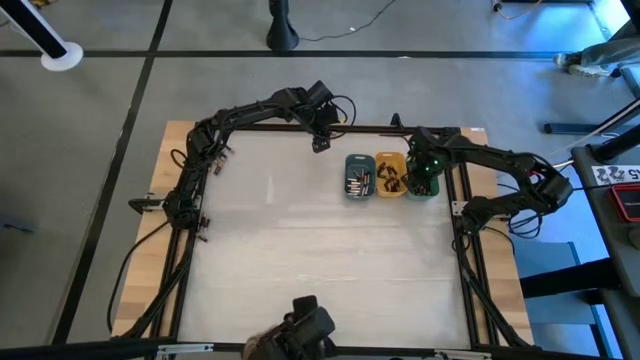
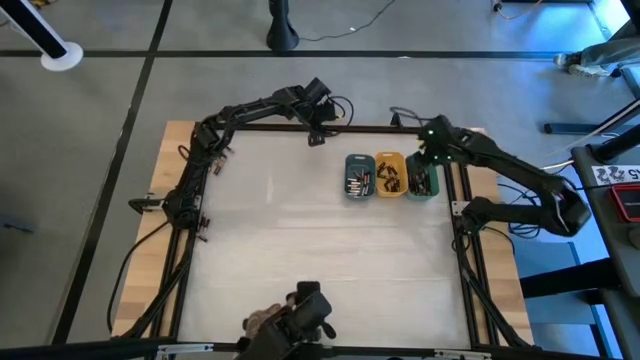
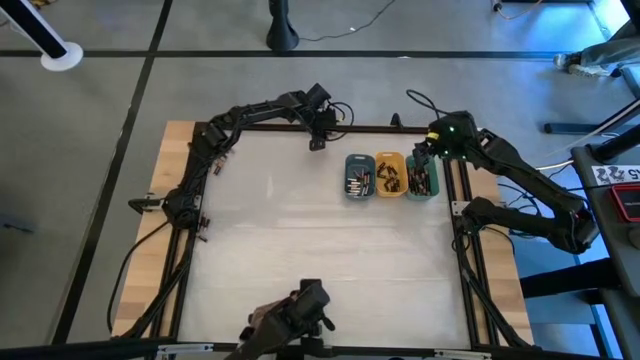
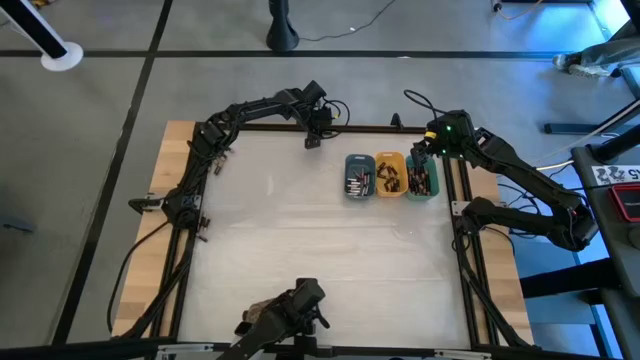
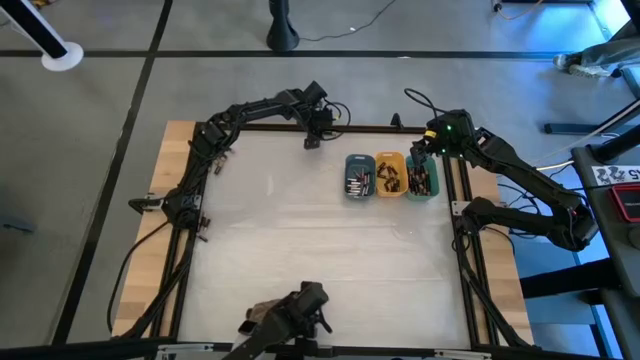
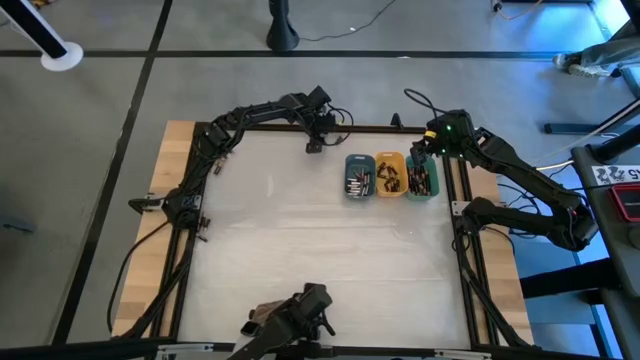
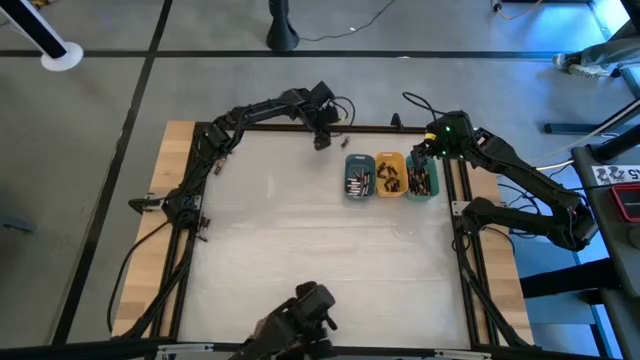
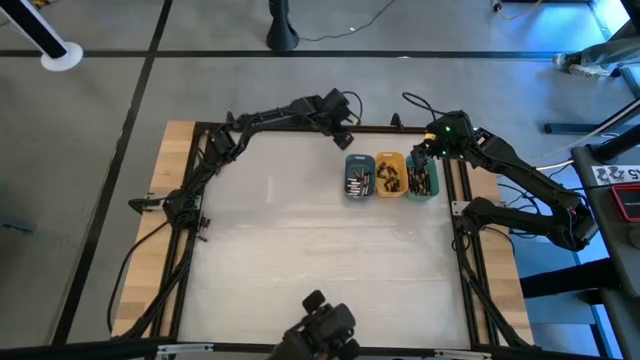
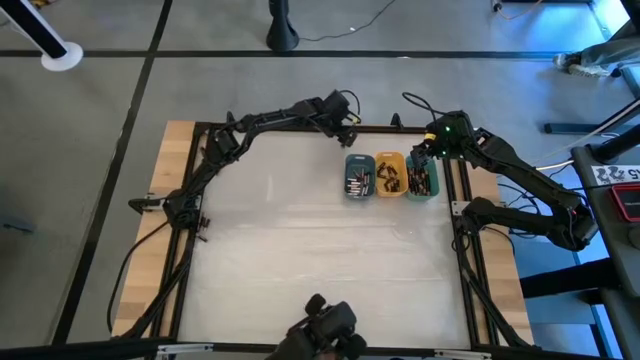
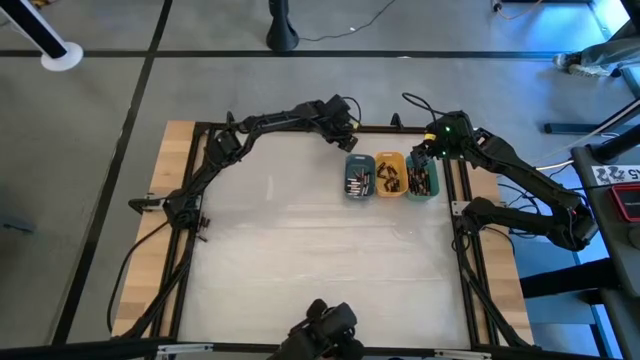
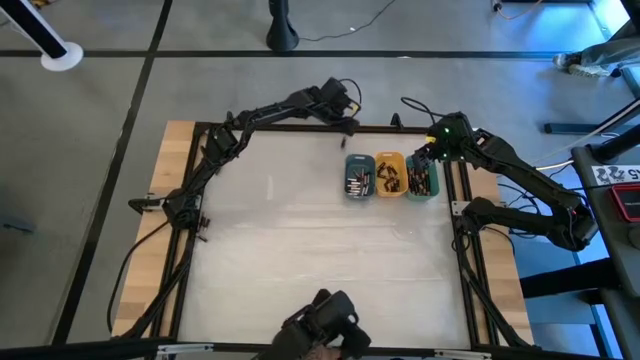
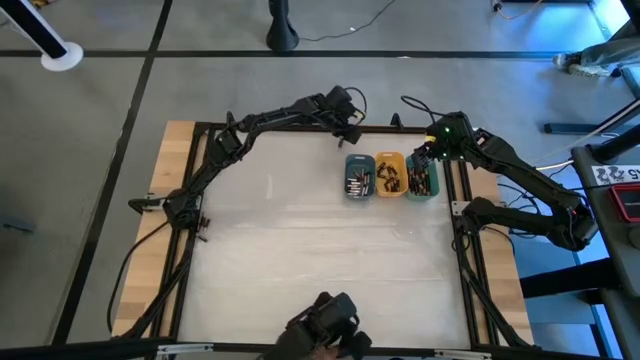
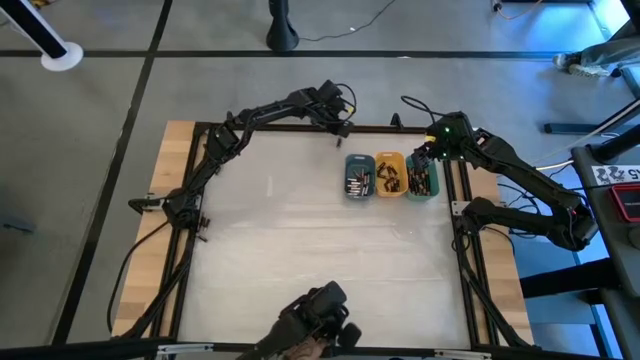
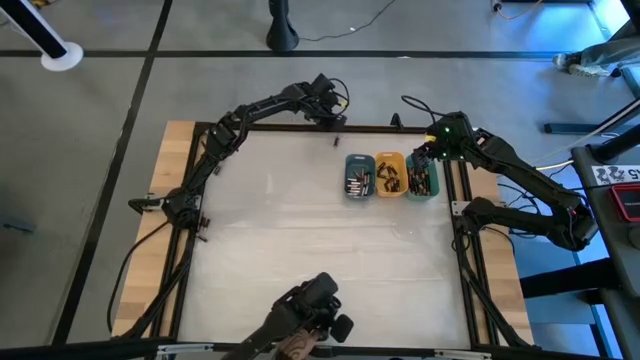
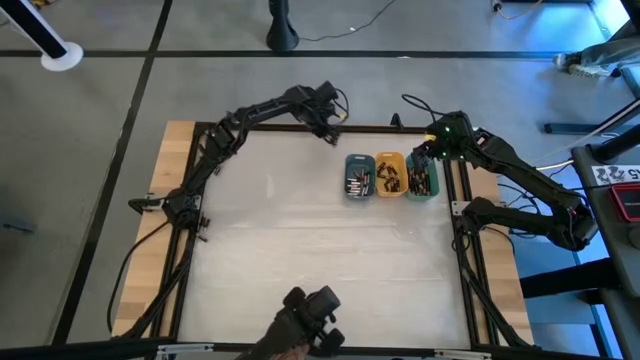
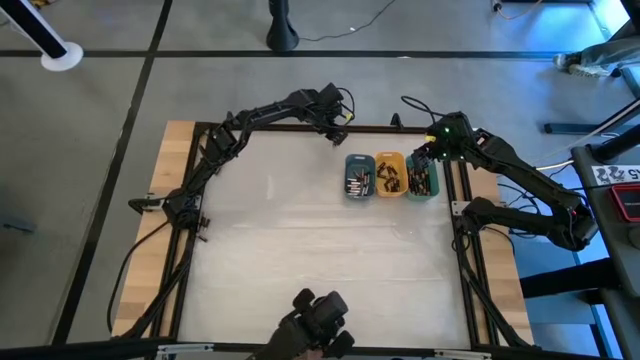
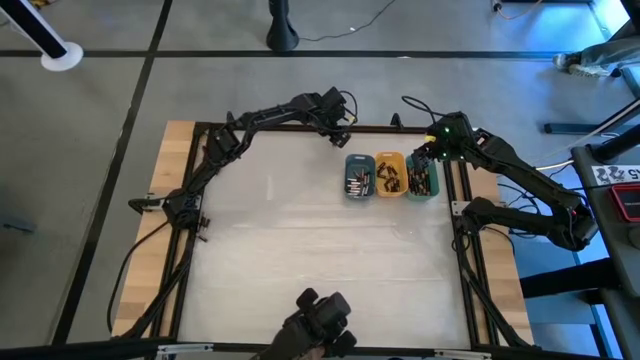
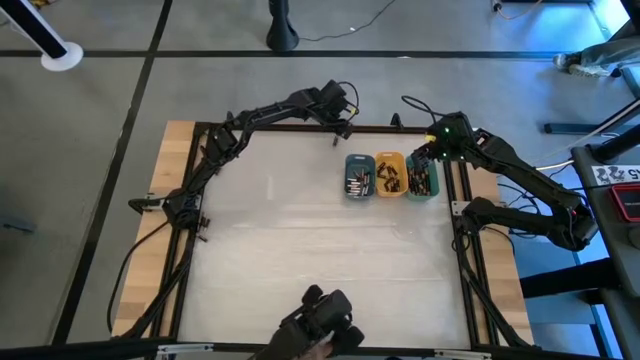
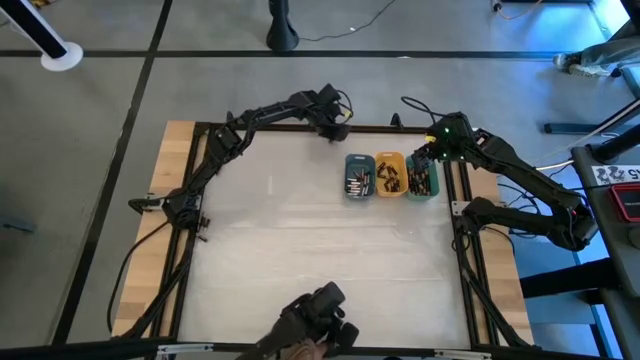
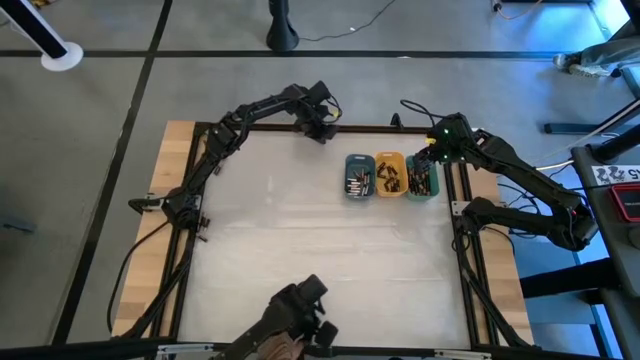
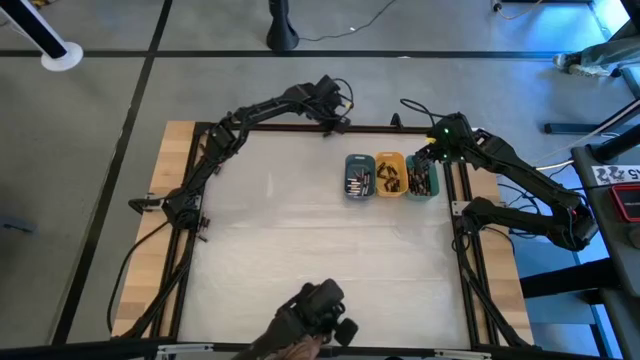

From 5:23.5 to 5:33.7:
Task: Sort batteries
Put the black battery into the green bin

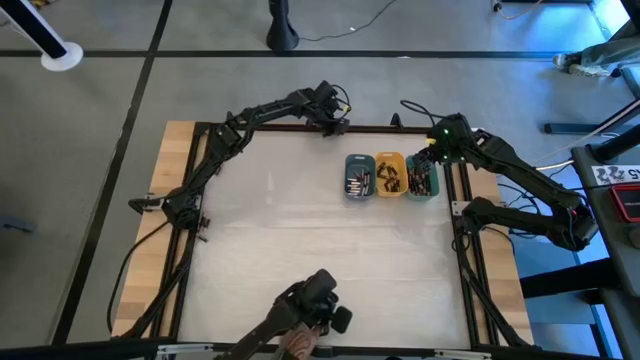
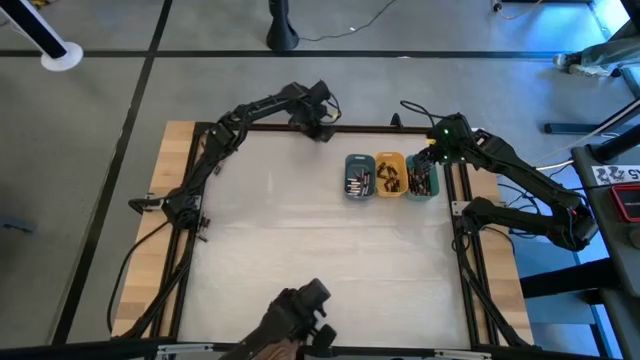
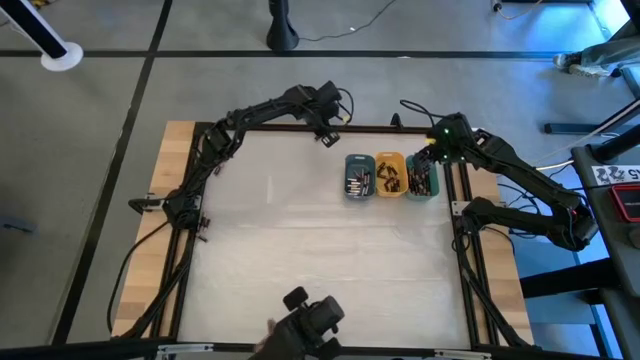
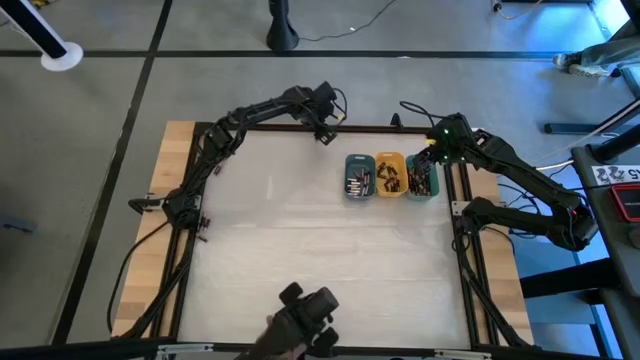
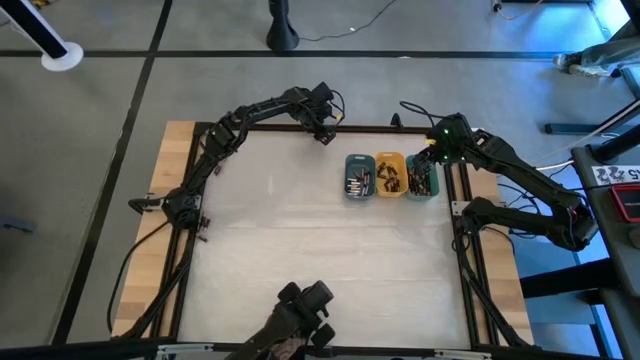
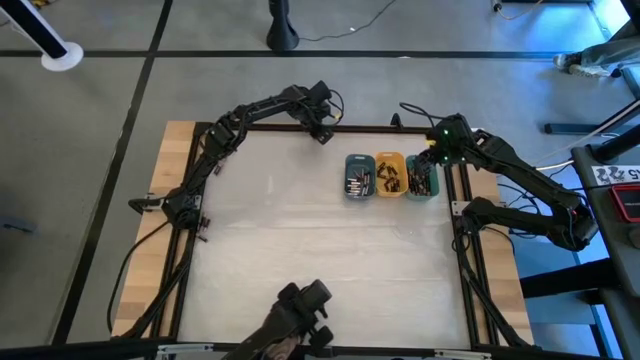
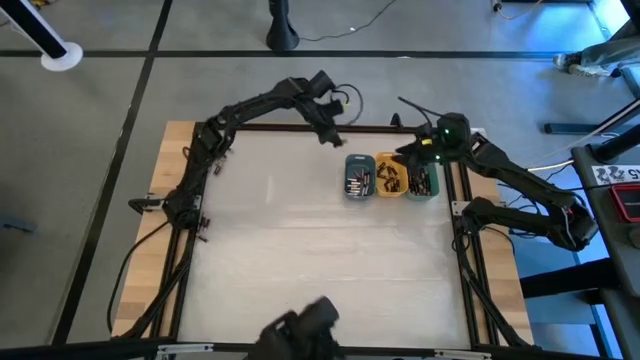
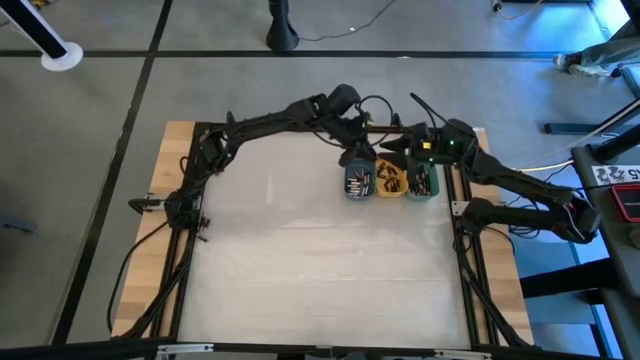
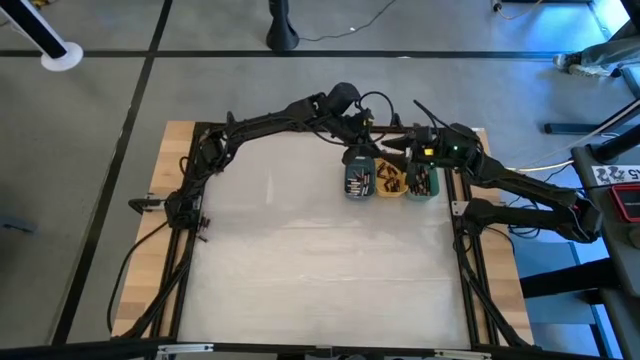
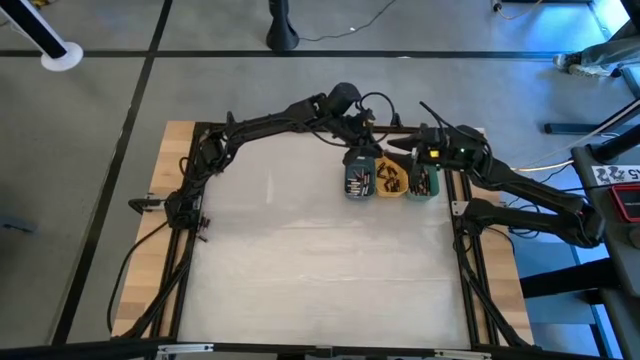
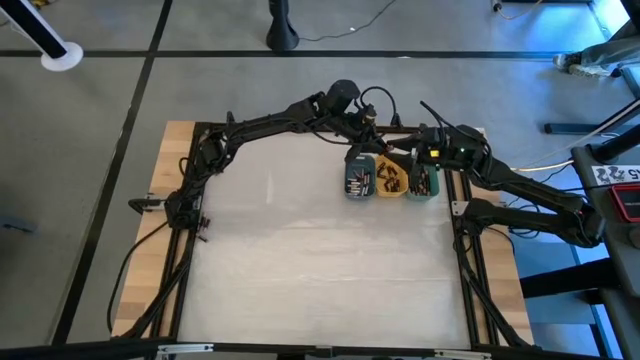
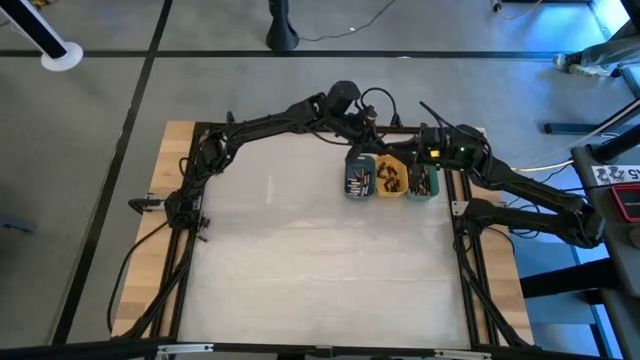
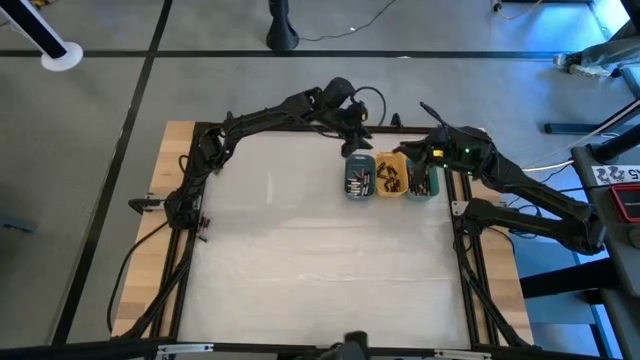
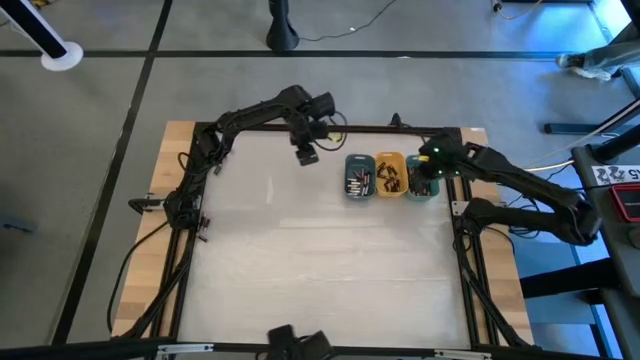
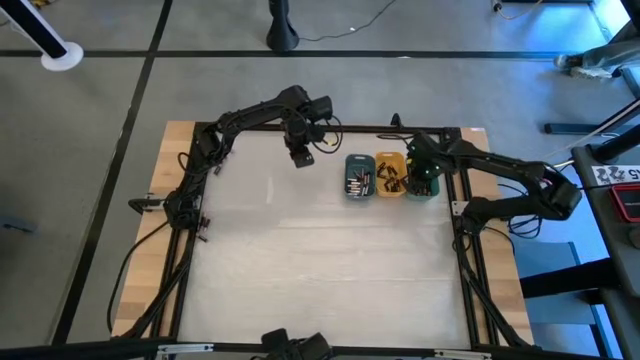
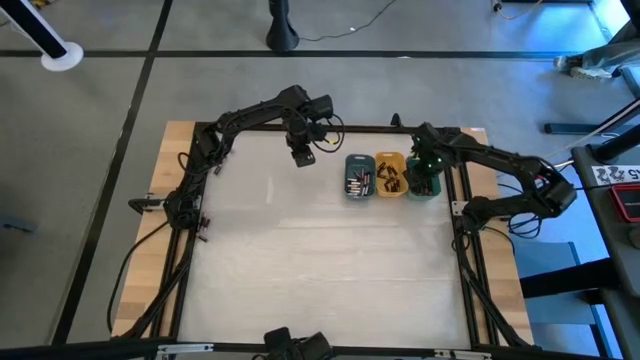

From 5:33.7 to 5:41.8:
Put the black battery into the green bin

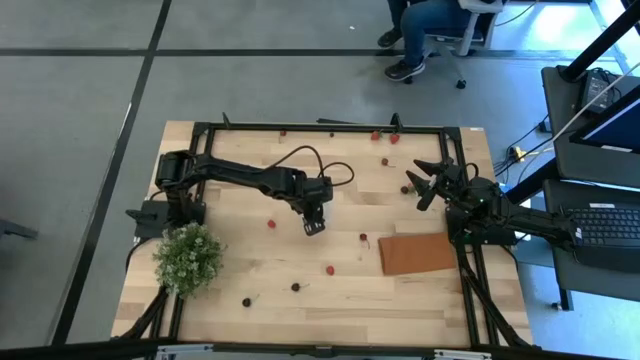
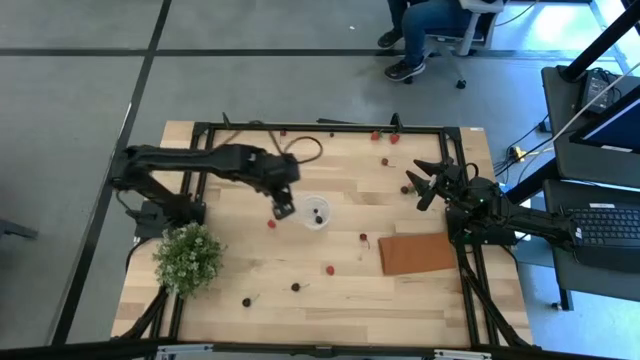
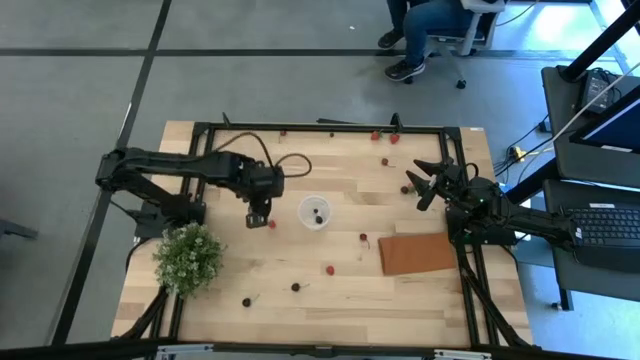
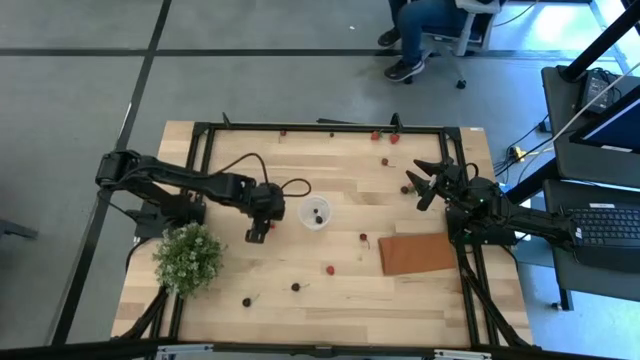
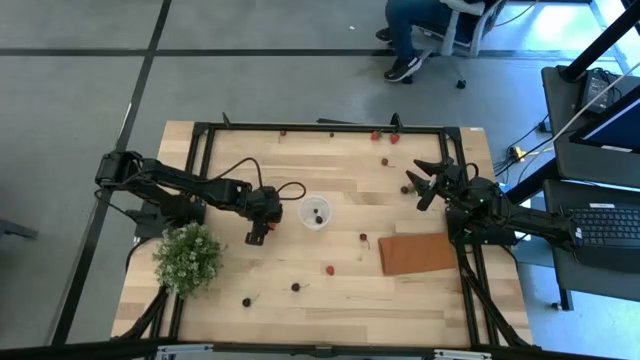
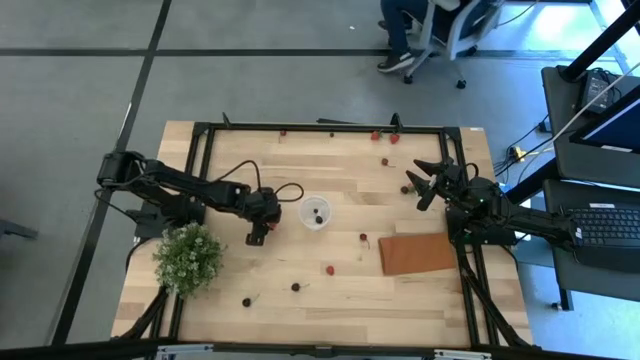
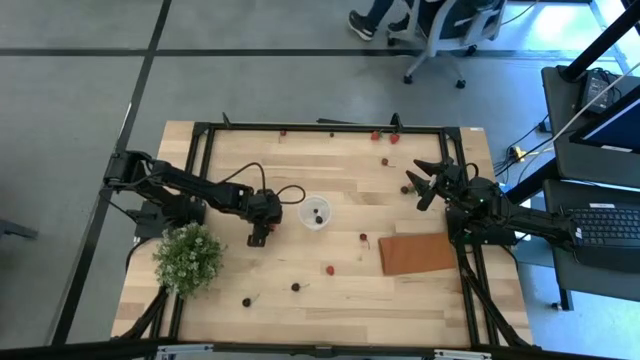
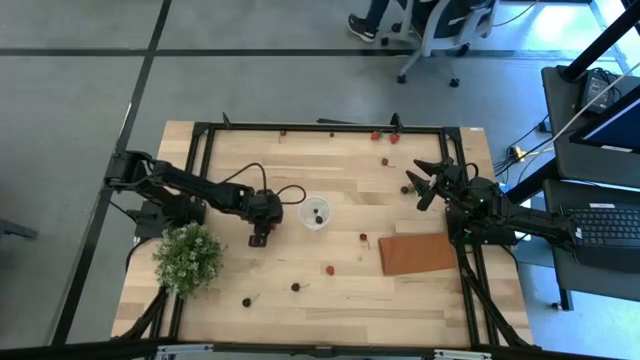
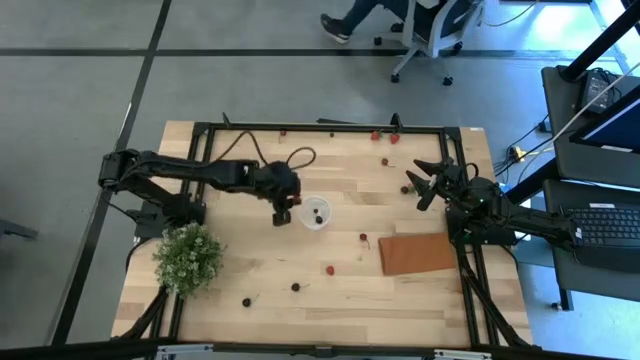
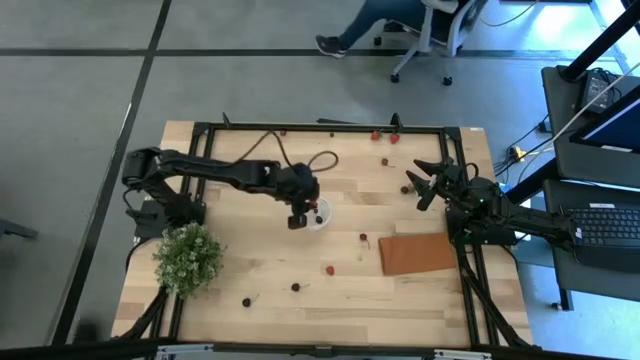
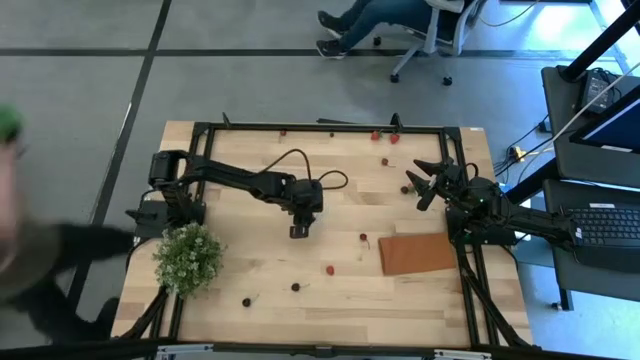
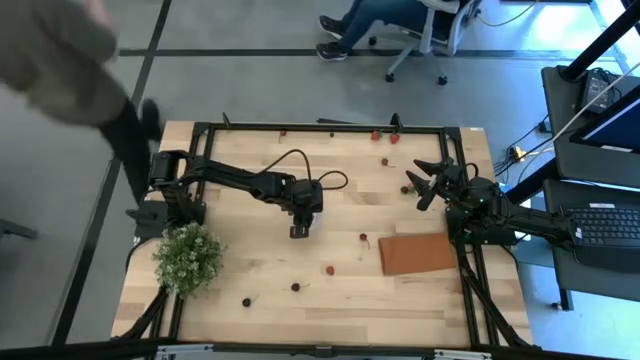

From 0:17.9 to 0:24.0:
Task: Pick and placing Produce into tupperware
Put the top raspberry into the bin
